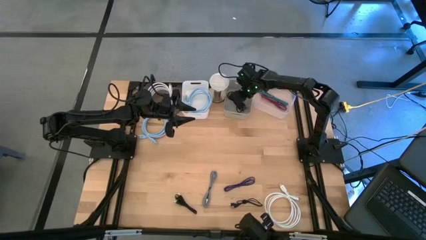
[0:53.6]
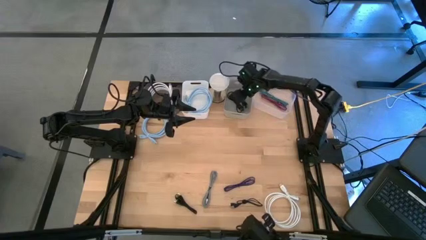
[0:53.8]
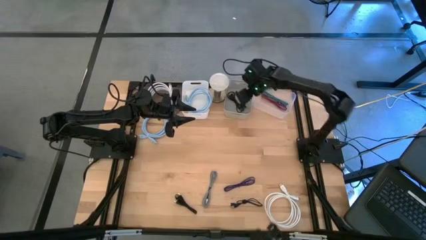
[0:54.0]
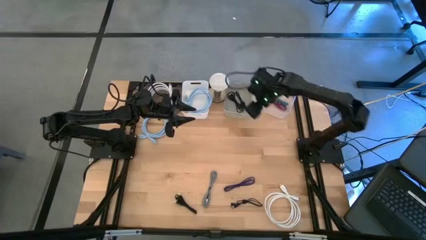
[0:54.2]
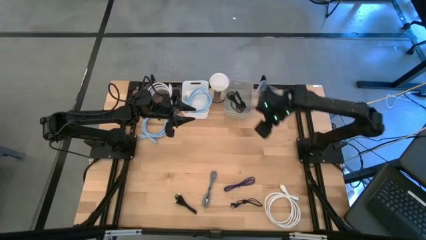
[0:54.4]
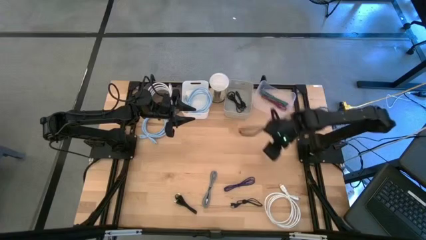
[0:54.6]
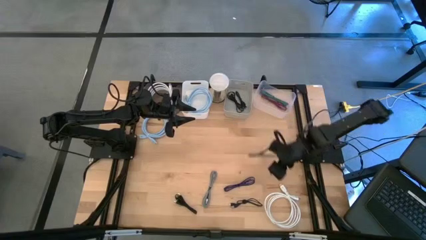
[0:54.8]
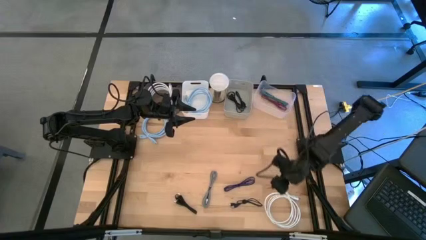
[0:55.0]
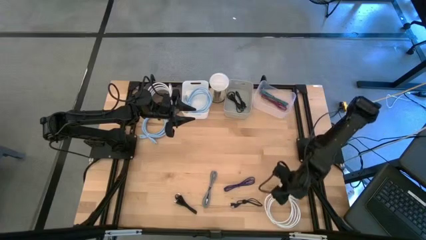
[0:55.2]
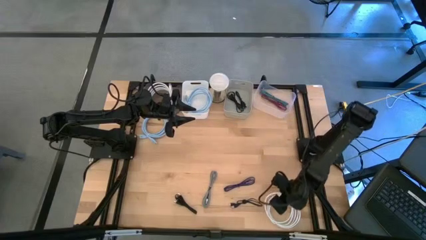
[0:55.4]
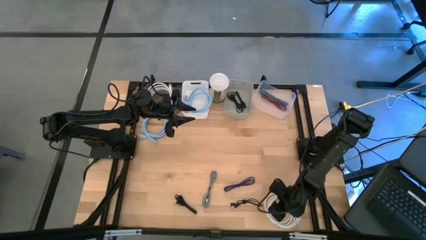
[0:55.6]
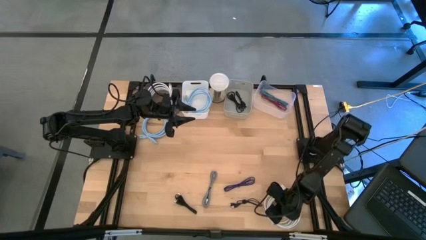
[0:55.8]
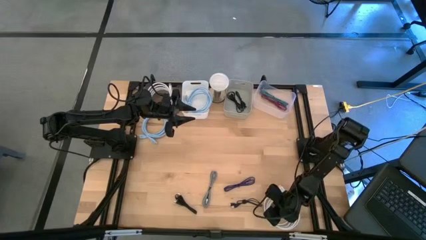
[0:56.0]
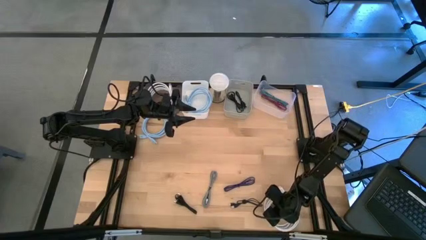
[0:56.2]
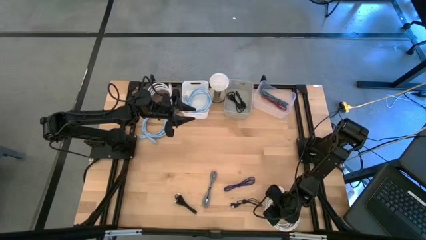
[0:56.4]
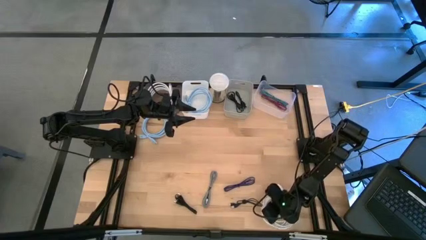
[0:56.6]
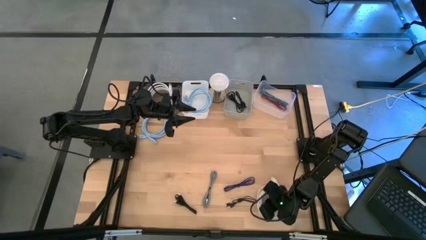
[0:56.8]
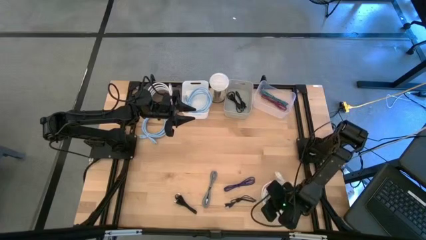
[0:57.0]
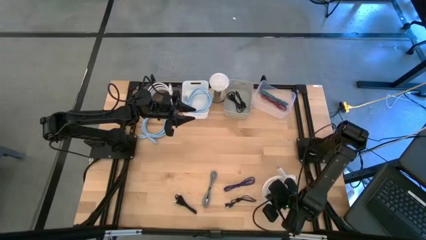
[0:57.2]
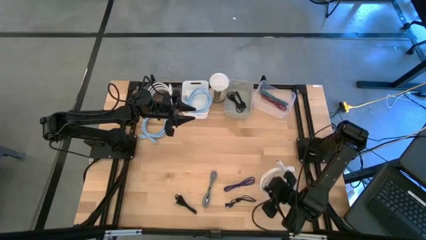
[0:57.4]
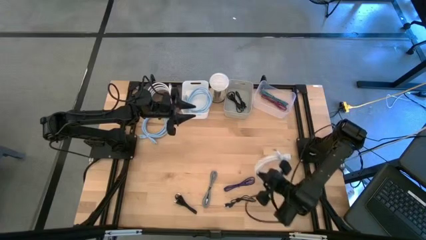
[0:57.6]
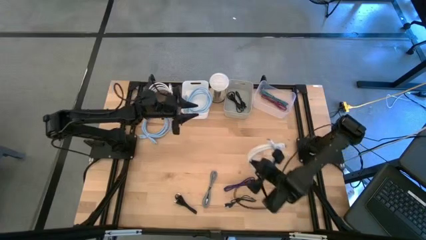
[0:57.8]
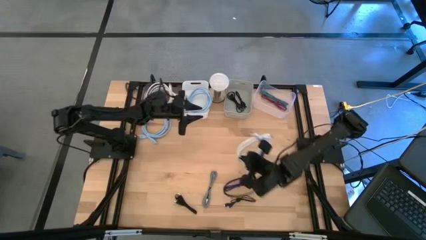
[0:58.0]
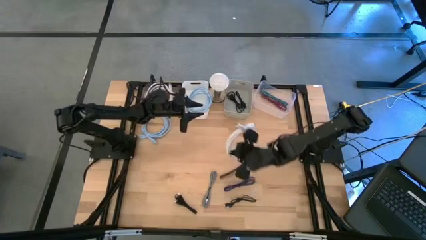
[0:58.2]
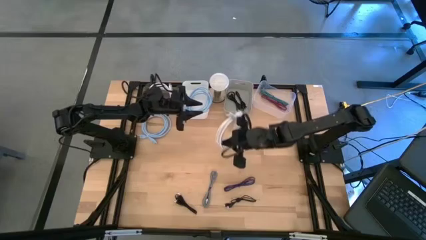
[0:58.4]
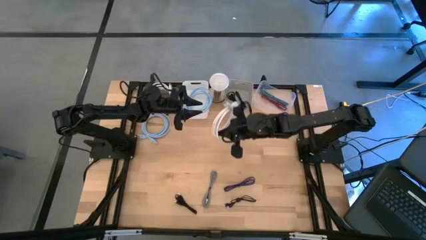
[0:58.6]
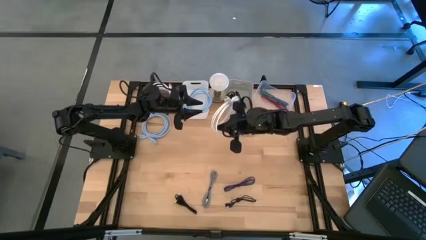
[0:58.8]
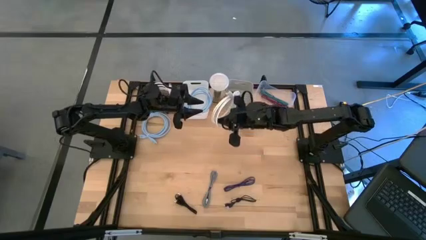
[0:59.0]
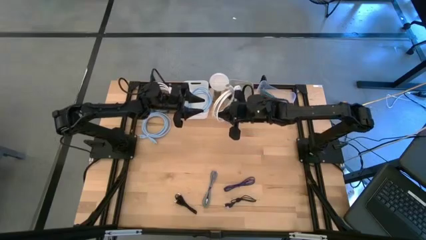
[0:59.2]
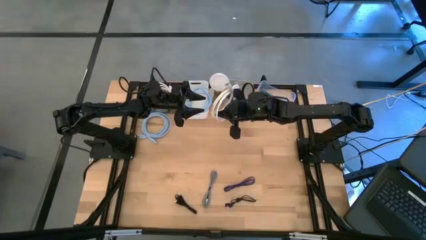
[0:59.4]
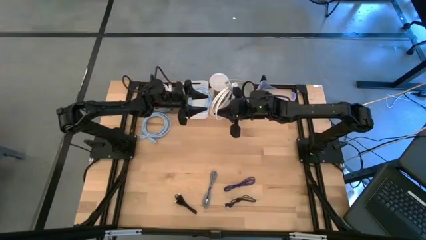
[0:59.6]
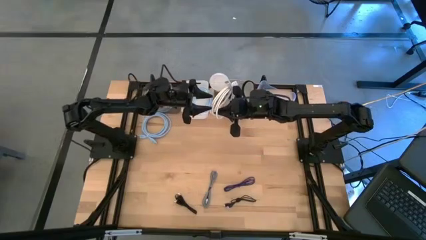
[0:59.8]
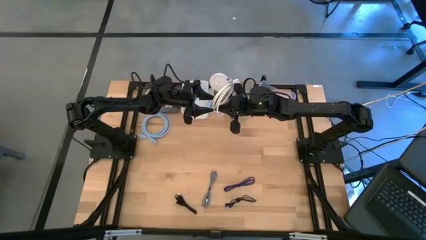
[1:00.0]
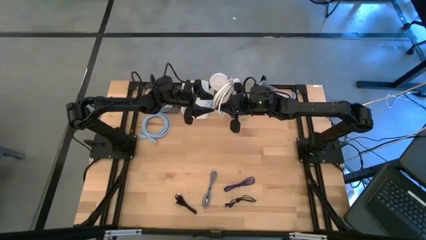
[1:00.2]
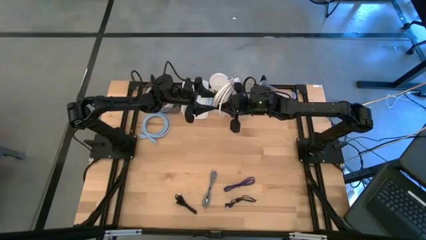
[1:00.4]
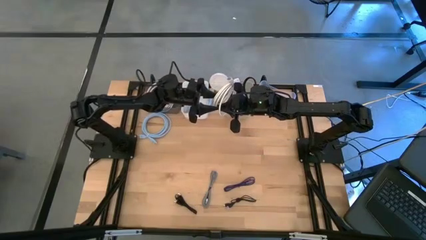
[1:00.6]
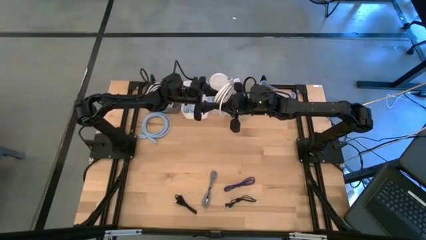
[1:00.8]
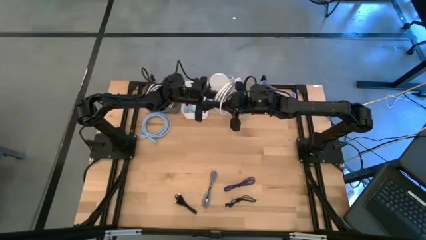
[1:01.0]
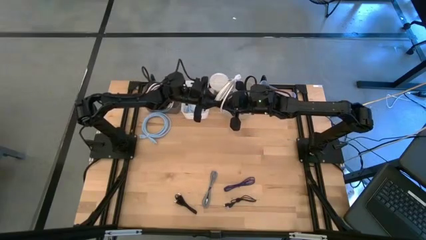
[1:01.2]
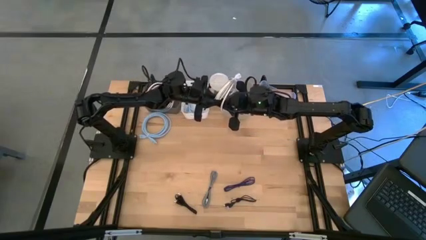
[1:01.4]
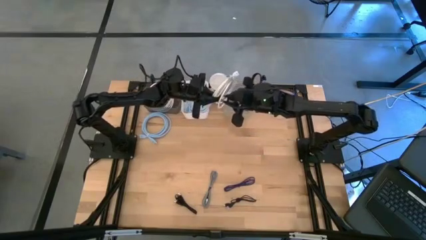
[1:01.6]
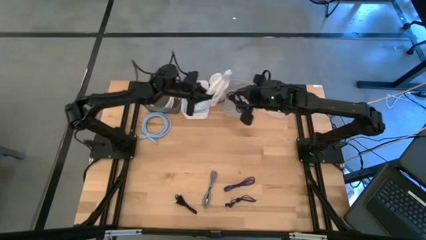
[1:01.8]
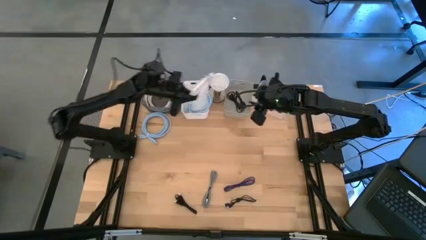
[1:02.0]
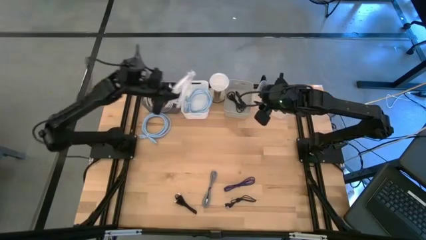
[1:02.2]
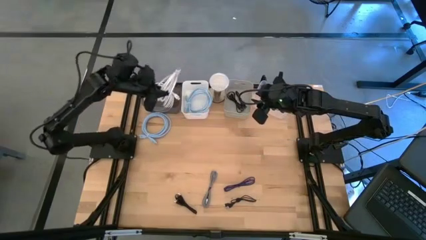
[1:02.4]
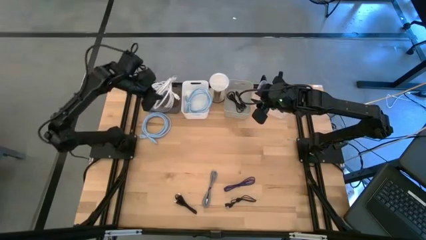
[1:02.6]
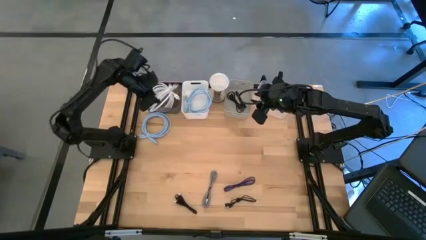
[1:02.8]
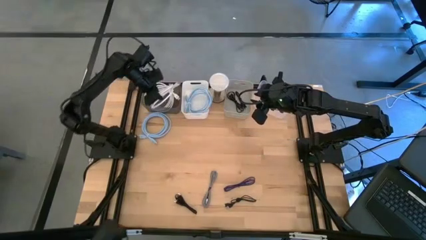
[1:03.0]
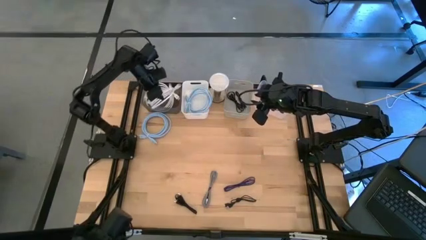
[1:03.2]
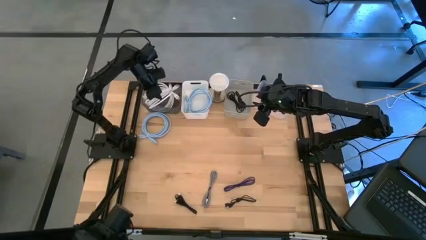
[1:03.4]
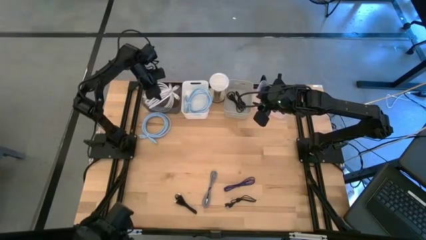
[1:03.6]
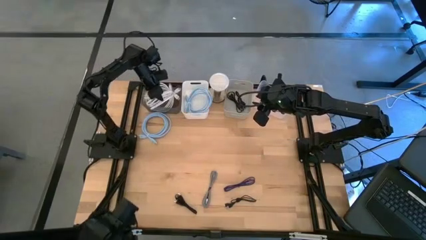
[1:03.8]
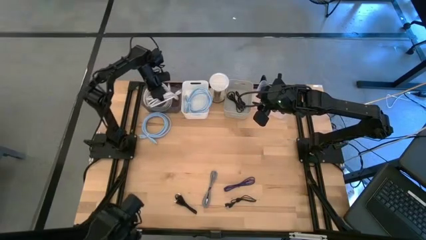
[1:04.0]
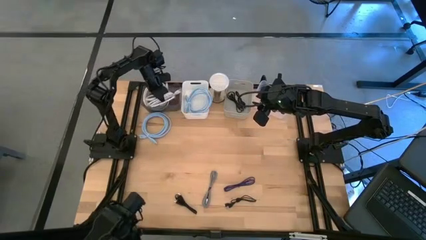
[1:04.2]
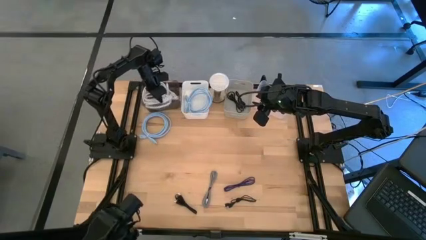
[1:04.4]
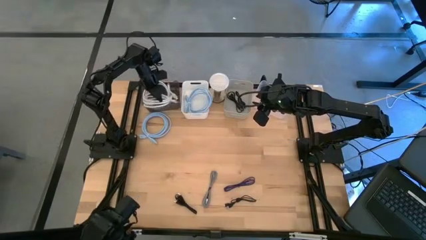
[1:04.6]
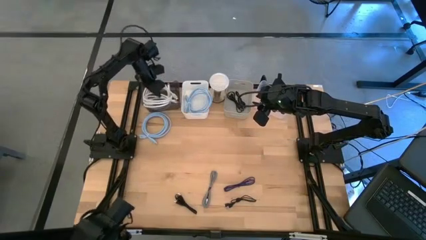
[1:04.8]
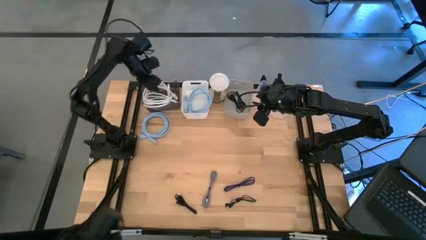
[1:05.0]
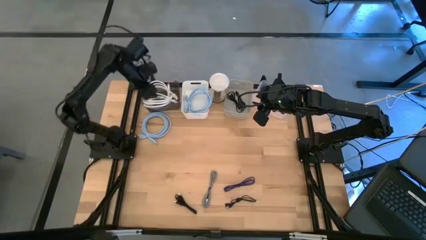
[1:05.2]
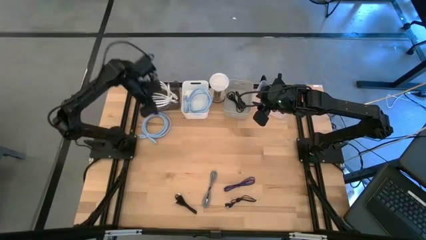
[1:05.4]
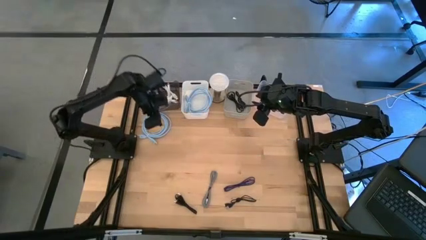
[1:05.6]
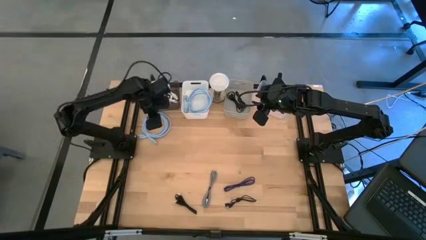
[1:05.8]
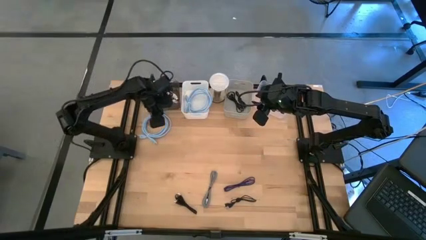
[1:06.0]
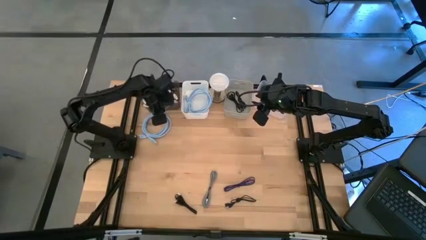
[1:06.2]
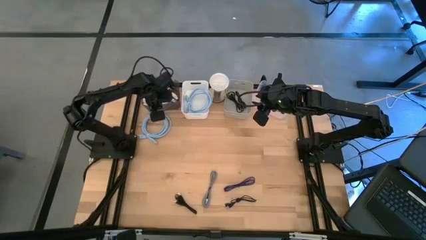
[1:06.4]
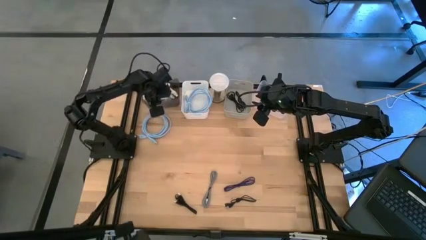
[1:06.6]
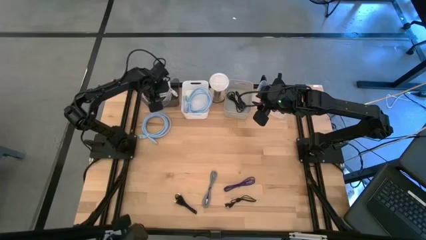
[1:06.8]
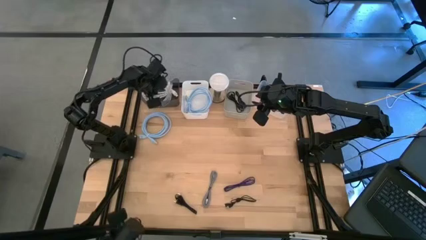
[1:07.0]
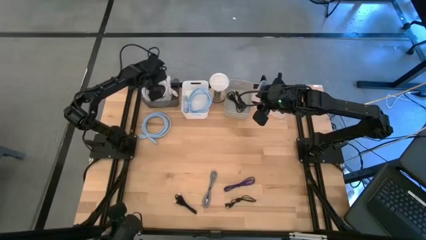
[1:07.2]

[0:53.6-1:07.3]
Task: Pick & Place USB Port
Put the white HDMI cable into the black bin
